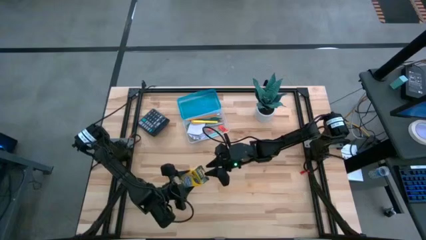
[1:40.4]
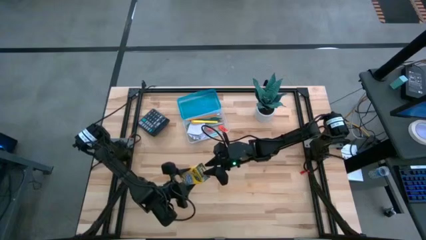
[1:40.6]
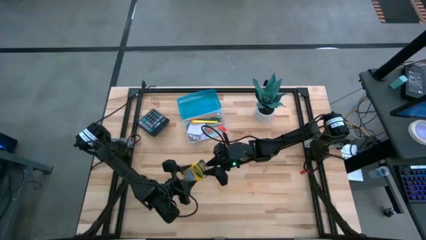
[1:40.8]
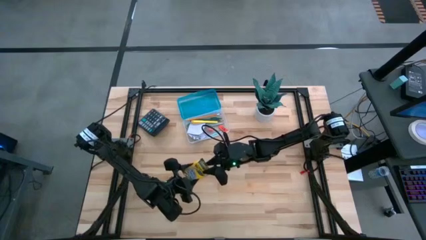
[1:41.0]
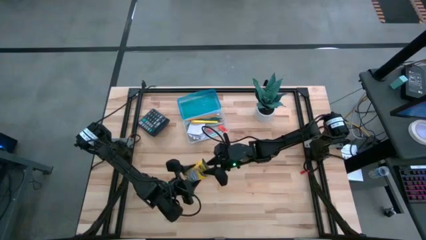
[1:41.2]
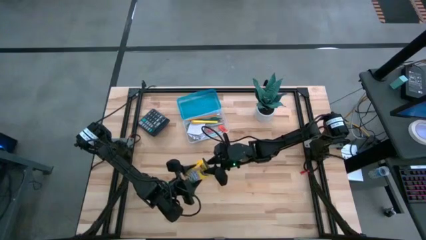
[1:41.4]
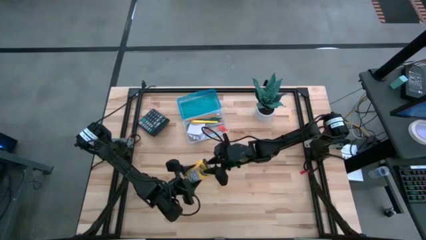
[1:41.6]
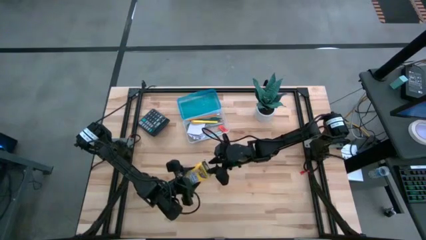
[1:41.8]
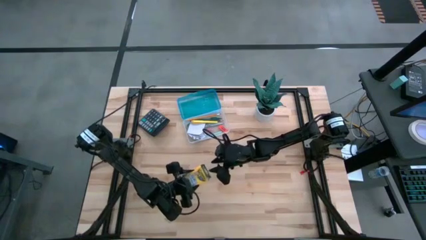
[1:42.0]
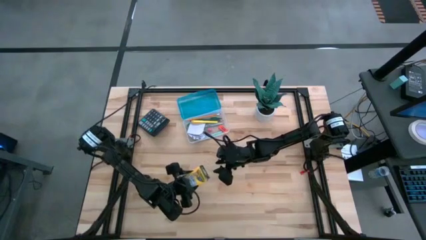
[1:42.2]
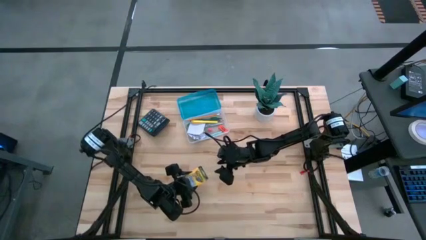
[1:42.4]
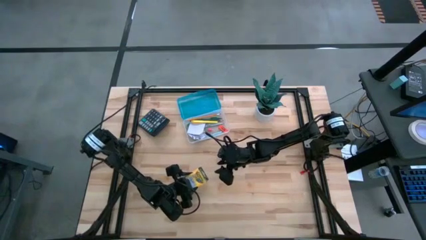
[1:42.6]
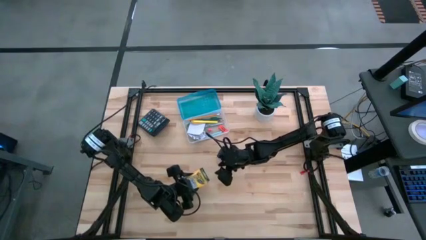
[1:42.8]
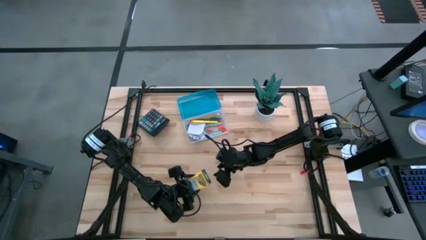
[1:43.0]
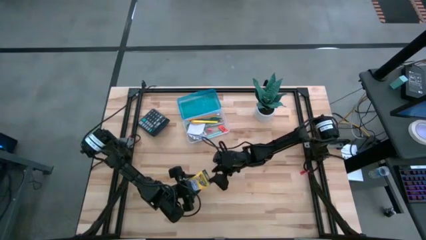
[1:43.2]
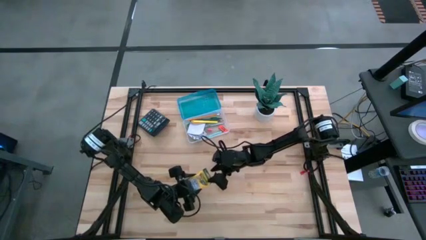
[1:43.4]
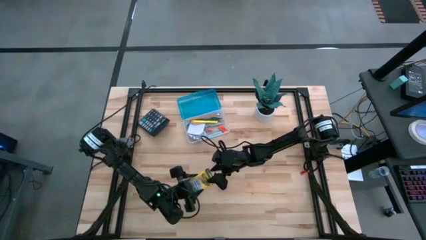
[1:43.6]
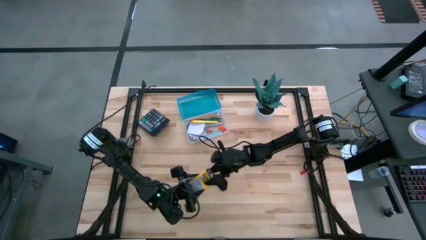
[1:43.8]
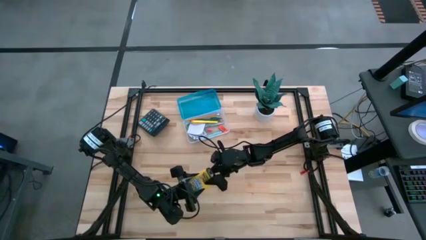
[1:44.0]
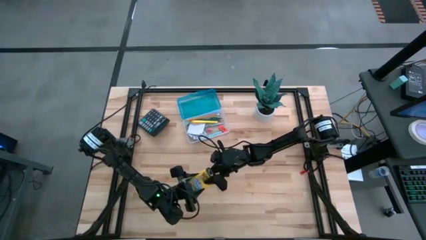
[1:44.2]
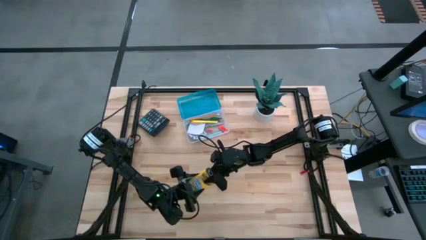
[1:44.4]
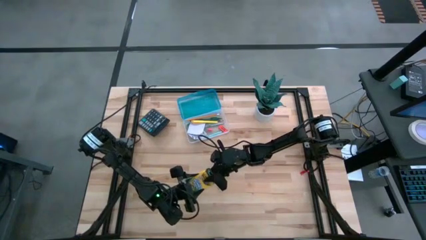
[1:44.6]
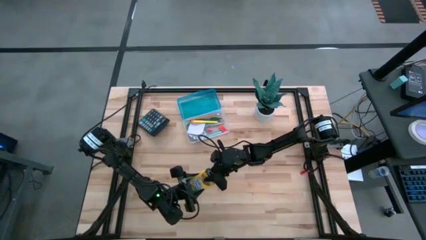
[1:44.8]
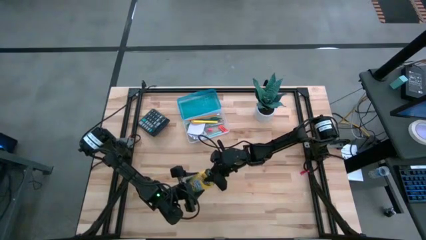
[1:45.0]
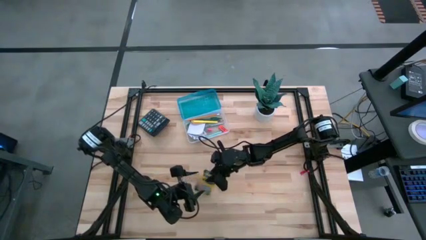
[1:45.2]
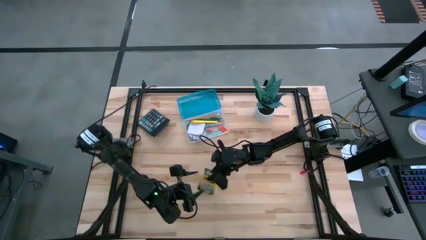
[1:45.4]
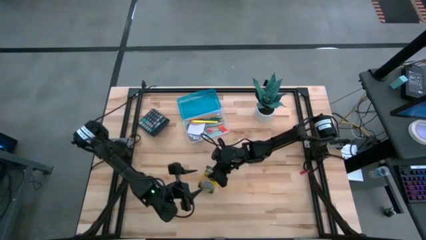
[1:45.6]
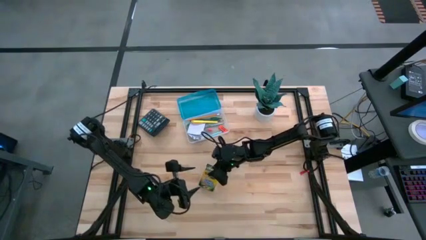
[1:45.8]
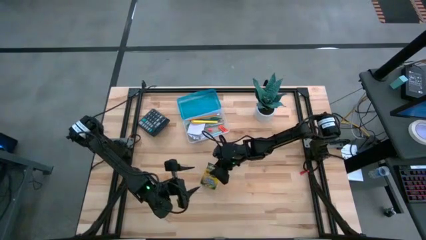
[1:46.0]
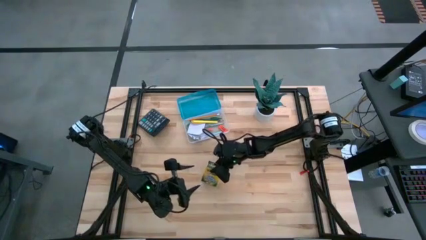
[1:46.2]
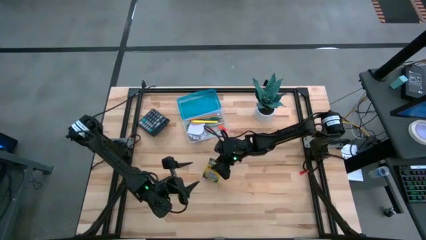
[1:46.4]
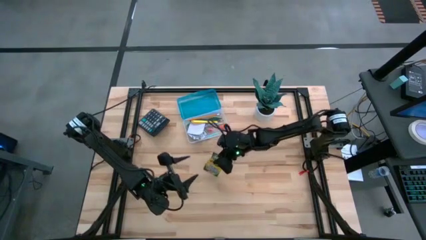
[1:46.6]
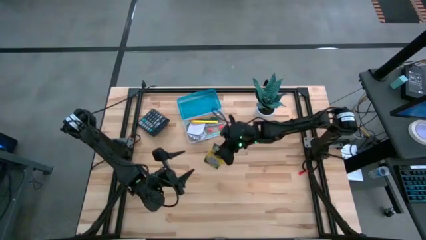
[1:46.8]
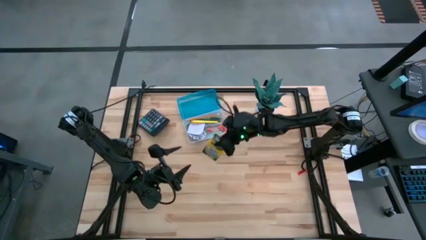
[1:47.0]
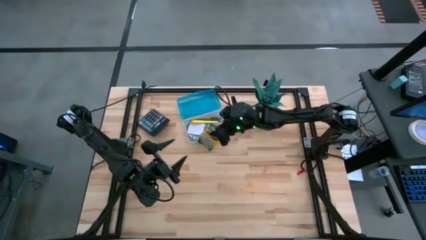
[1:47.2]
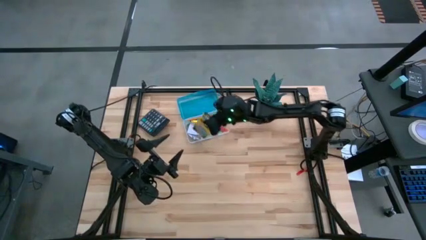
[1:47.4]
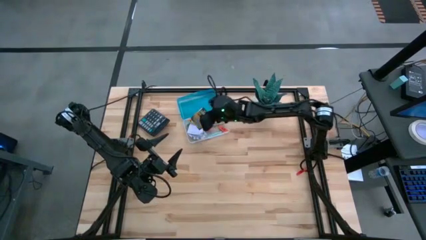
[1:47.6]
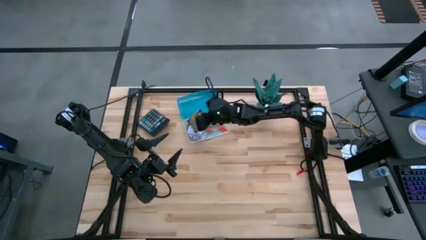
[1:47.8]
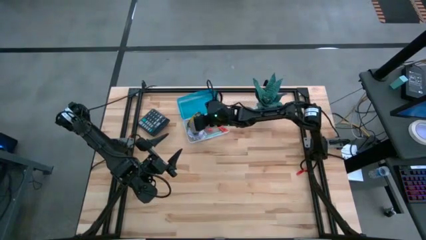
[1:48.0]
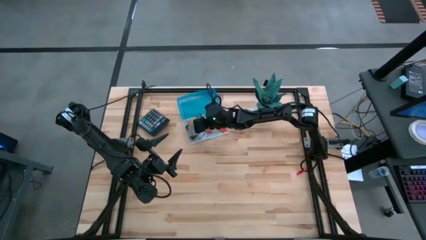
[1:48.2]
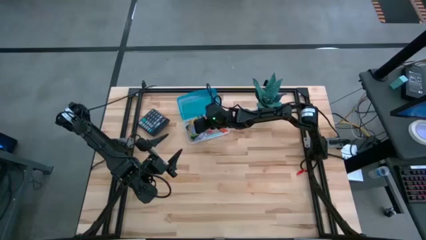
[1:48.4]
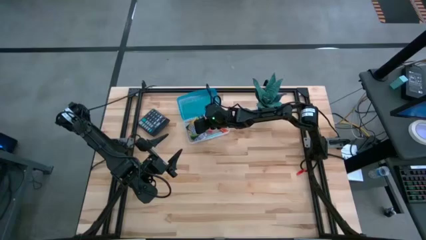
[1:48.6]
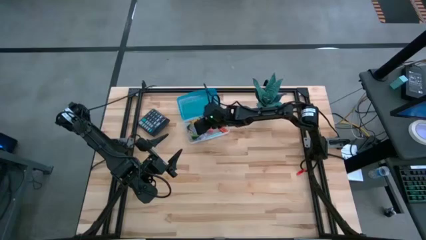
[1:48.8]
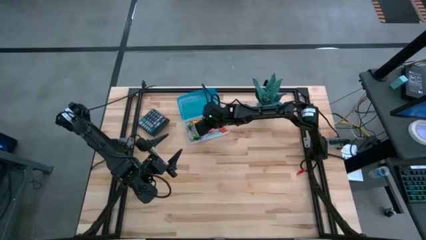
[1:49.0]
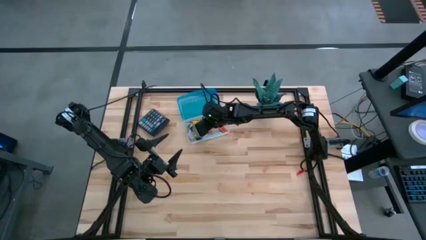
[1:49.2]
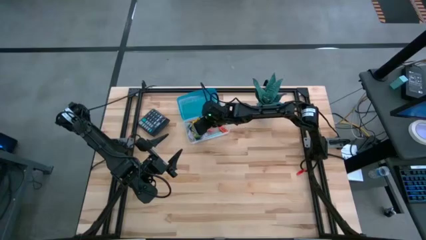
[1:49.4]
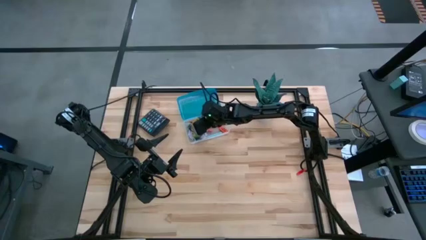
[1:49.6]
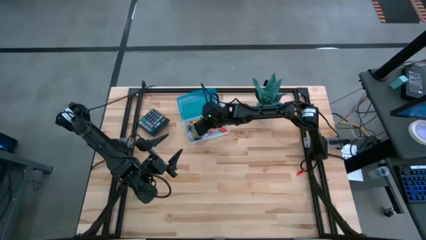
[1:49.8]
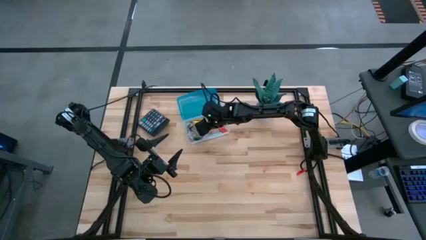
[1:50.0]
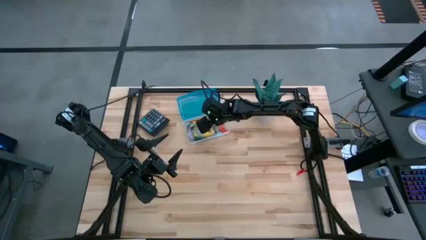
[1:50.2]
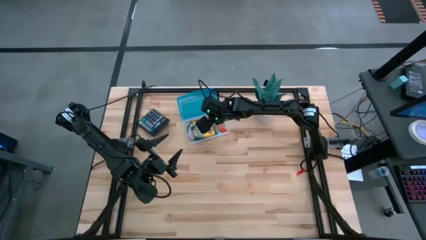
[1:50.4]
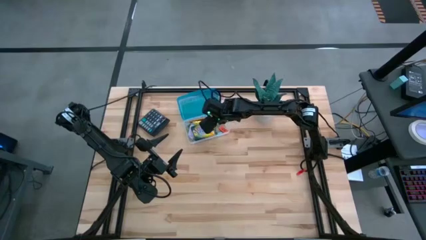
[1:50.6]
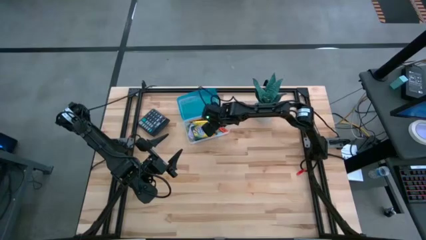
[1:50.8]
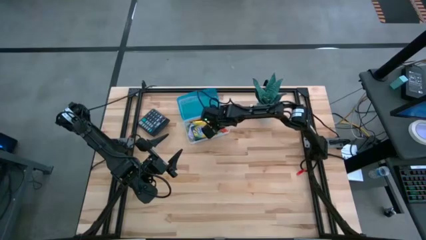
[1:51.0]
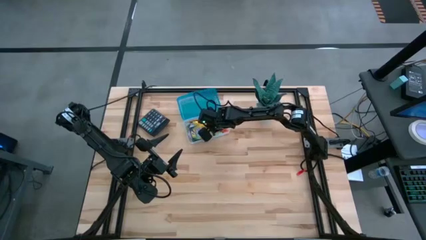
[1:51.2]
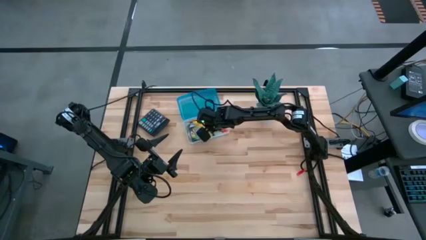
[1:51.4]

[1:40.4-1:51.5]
Task: Pack school essentials
Put the yellow crayon box into the blue supply box

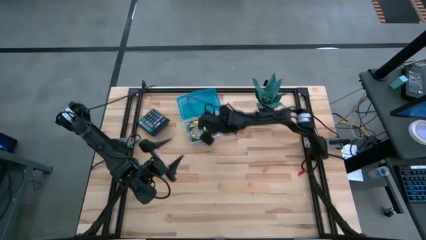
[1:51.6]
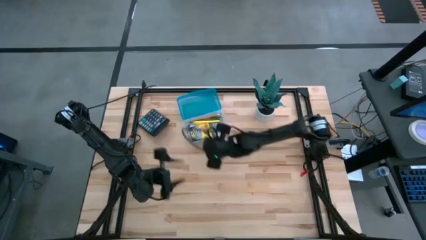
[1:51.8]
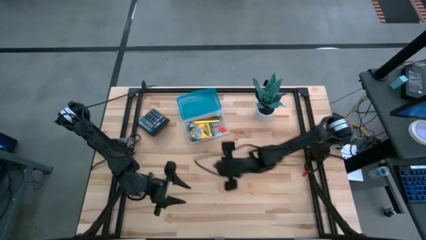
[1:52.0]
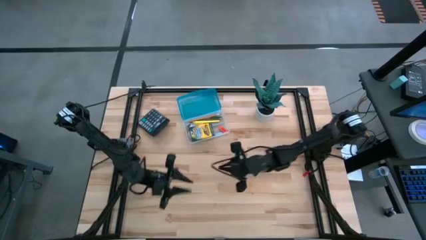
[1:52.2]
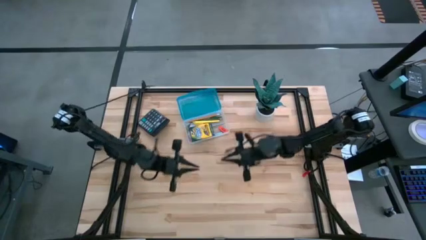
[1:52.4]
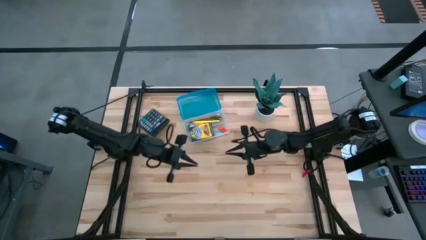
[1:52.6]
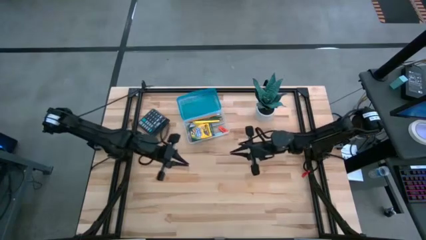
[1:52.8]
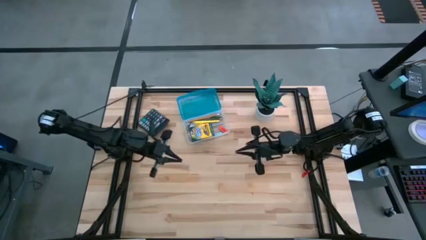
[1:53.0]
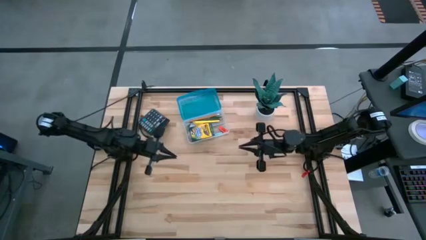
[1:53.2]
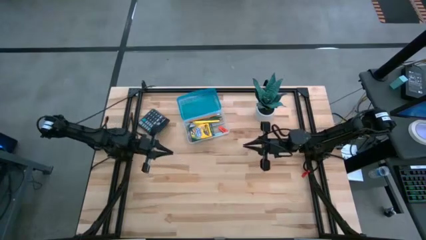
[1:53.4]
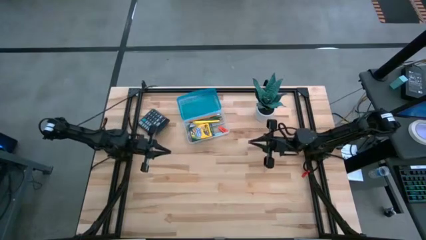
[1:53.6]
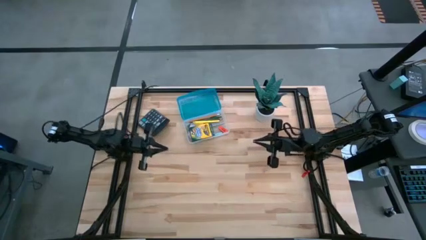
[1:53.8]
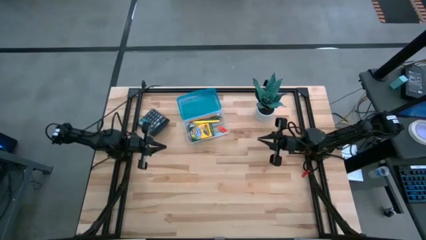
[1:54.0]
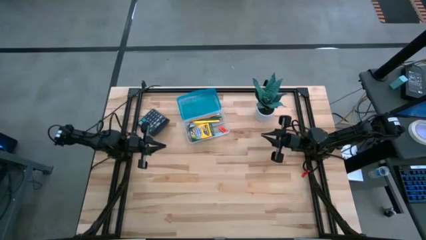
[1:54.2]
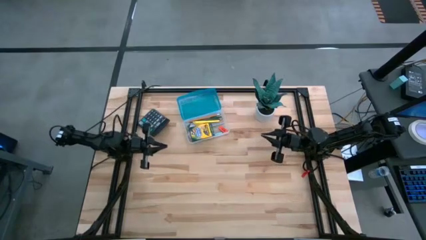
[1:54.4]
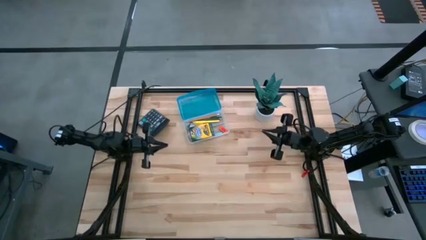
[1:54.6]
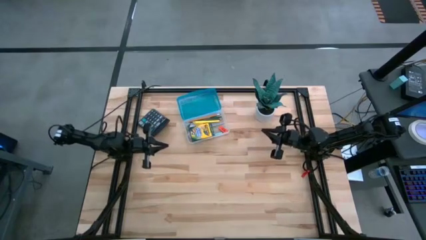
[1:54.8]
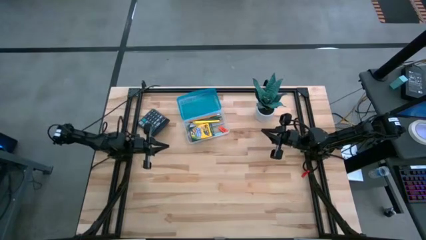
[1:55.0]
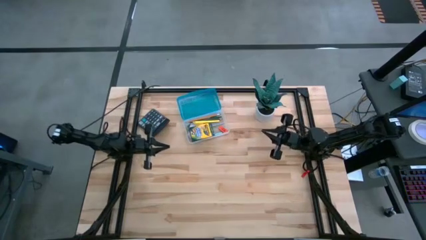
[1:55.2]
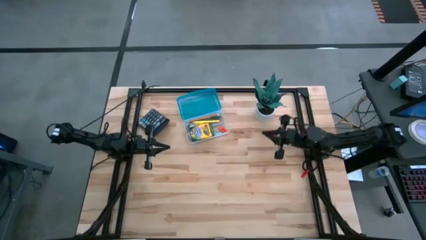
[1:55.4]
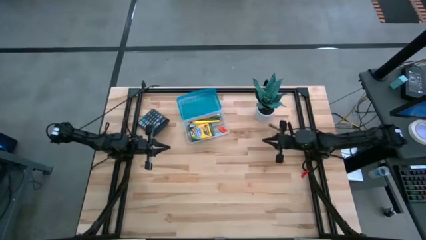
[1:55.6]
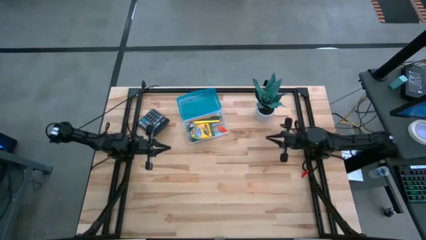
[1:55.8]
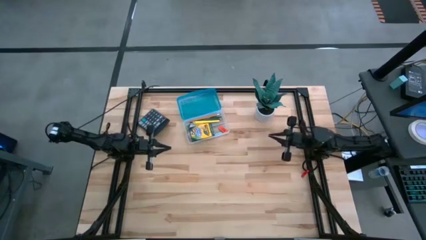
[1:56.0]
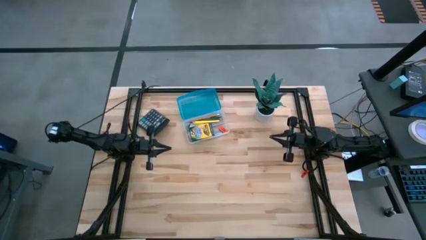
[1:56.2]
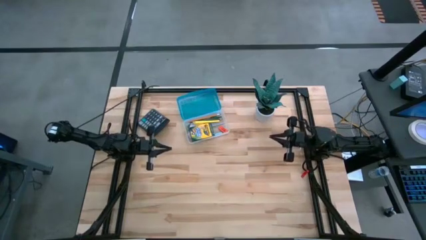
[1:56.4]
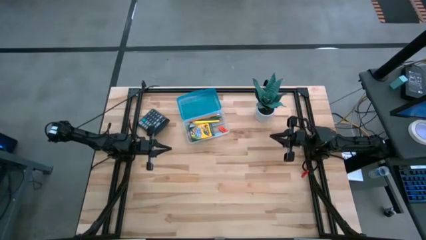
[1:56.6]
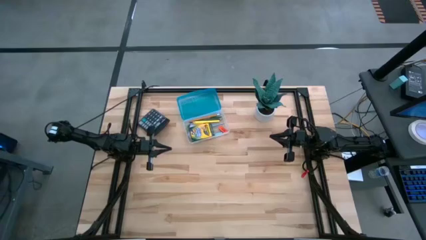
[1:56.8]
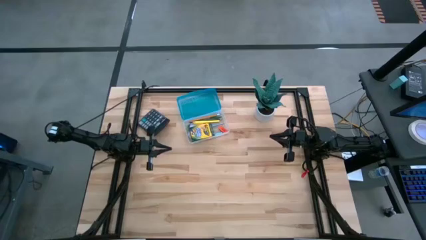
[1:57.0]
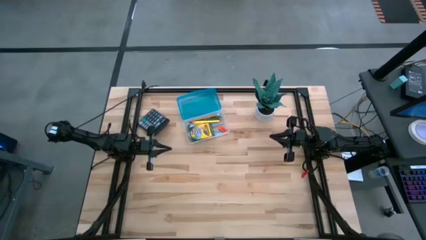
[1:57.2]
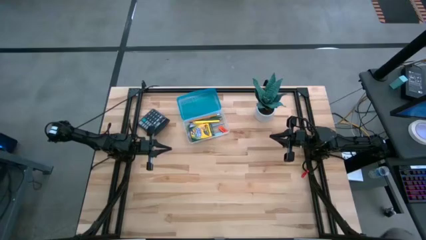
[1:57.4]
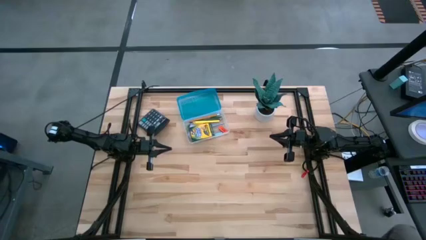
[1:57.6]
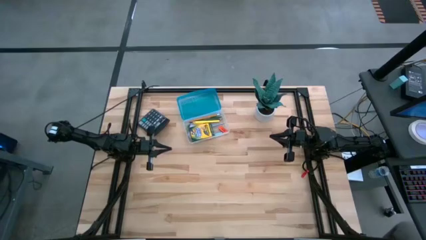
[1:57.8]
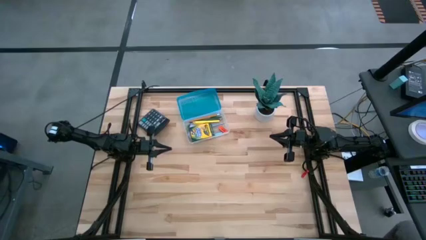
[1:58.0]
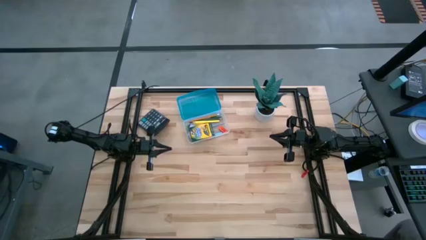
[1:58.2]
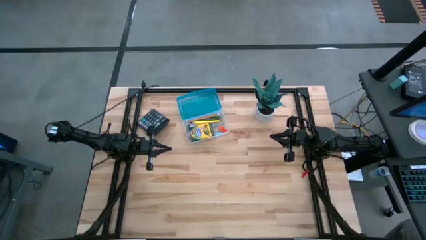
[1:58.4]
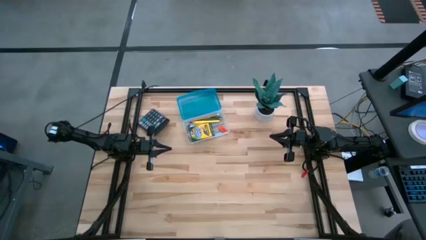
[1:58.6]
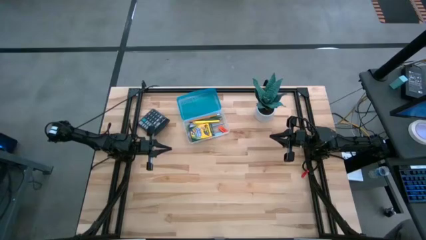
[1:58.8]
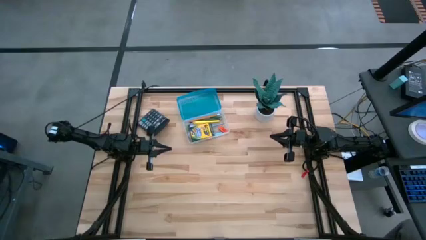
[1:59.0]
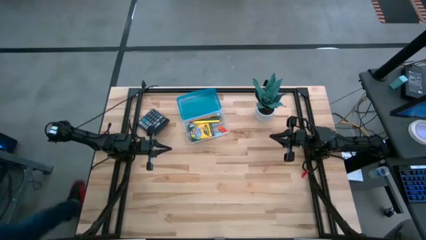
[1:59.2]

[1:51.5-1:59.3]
Return to Home Position
